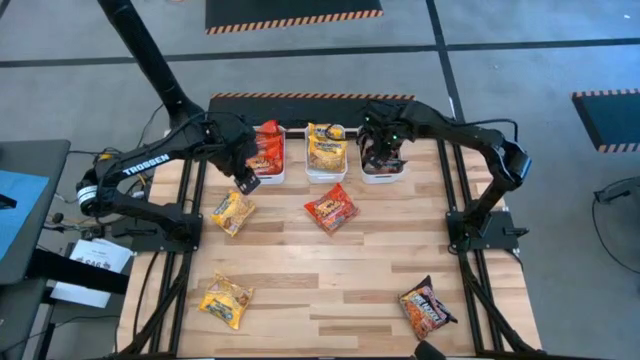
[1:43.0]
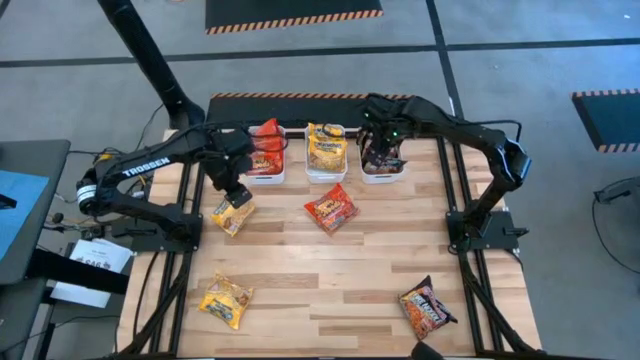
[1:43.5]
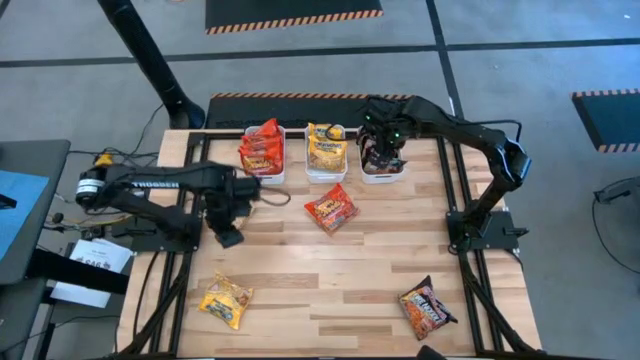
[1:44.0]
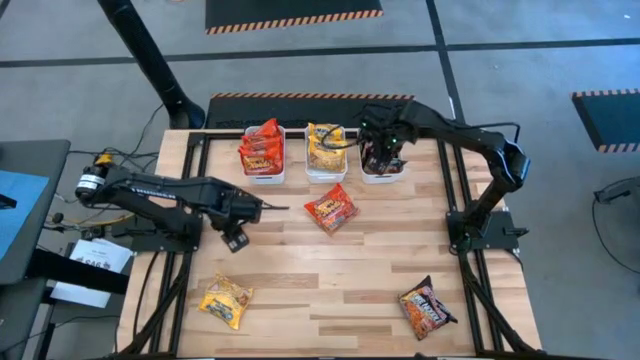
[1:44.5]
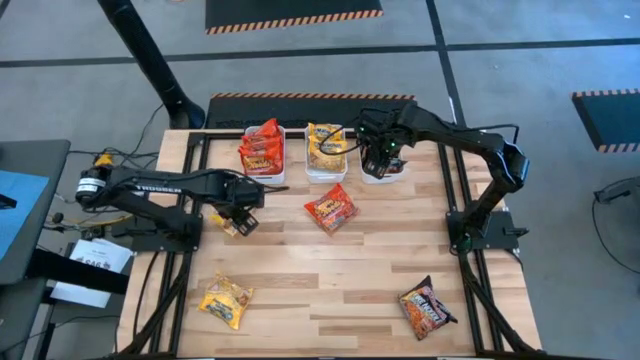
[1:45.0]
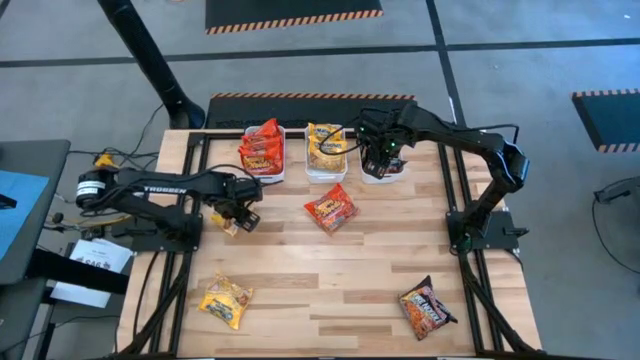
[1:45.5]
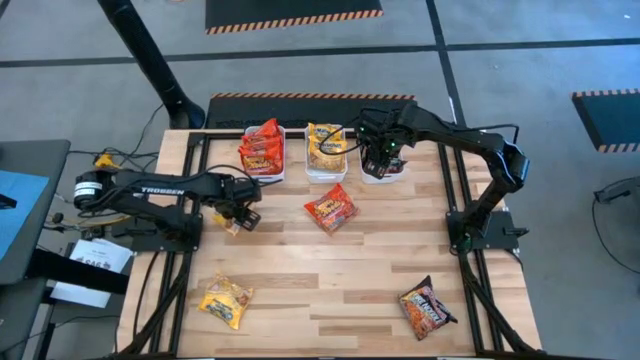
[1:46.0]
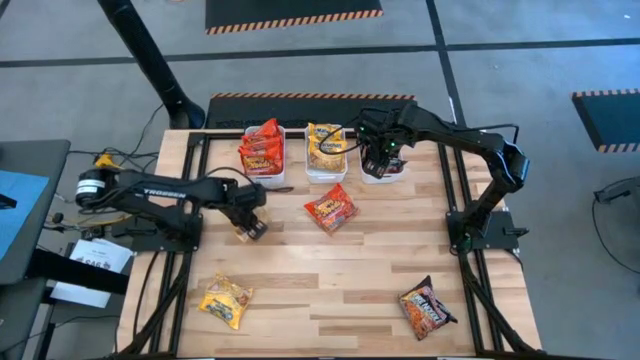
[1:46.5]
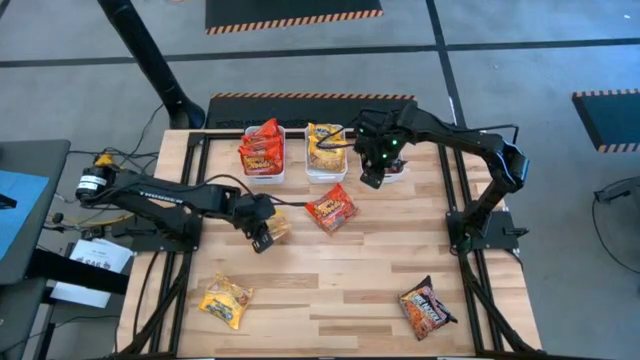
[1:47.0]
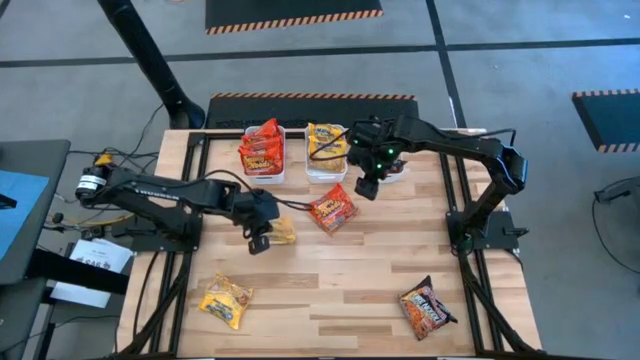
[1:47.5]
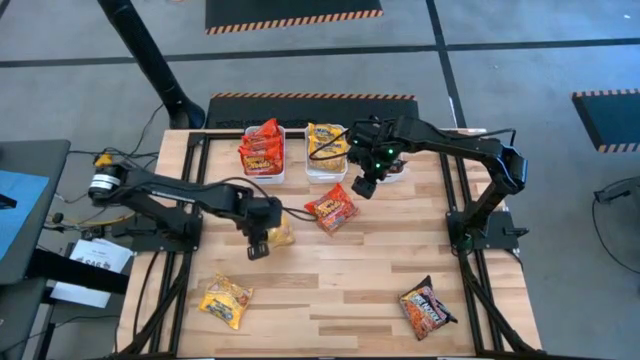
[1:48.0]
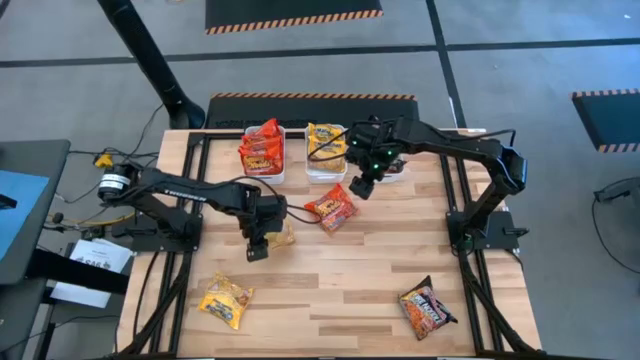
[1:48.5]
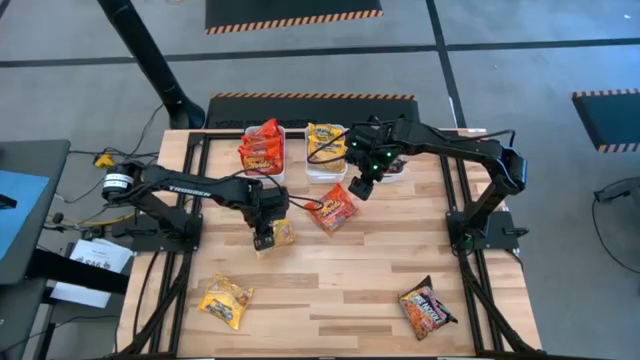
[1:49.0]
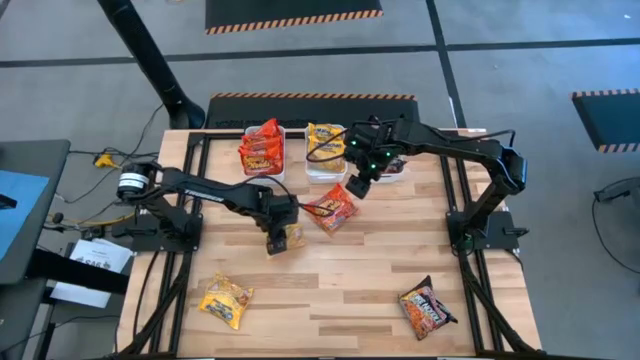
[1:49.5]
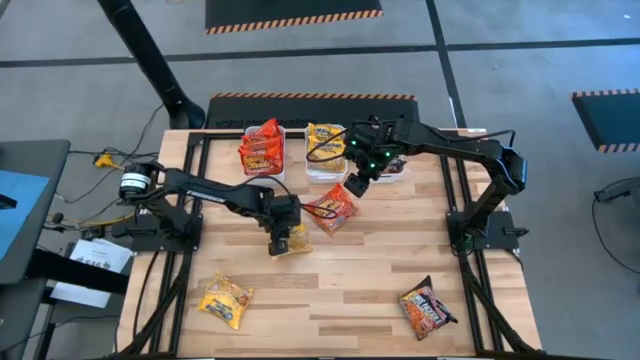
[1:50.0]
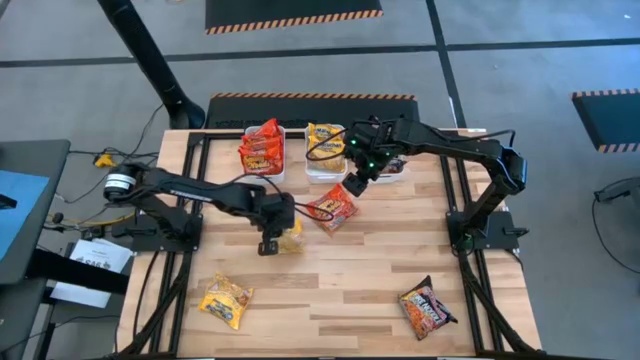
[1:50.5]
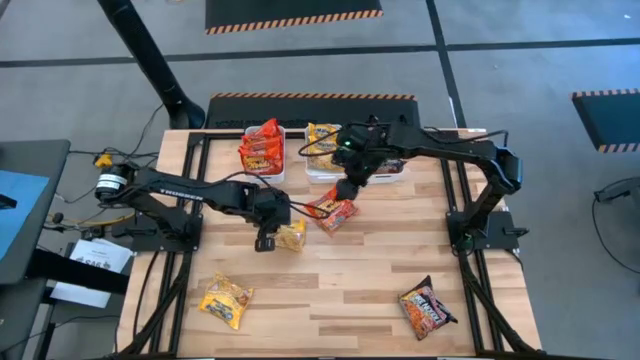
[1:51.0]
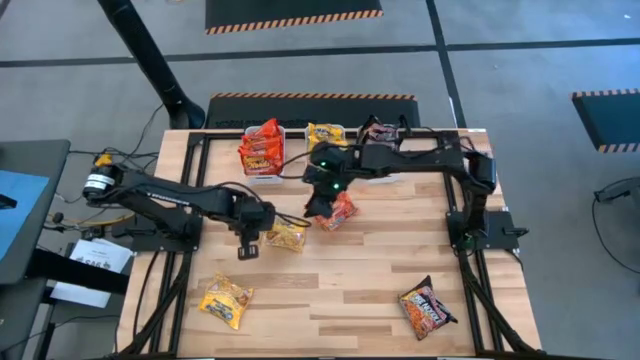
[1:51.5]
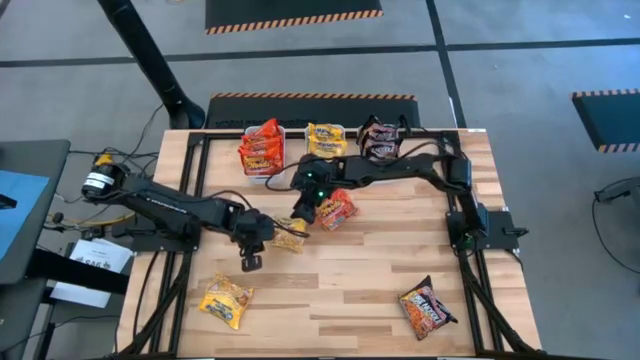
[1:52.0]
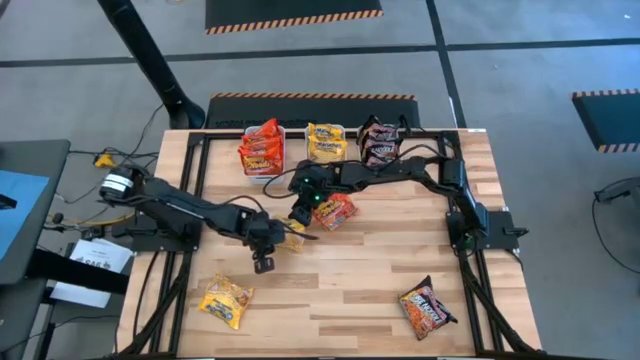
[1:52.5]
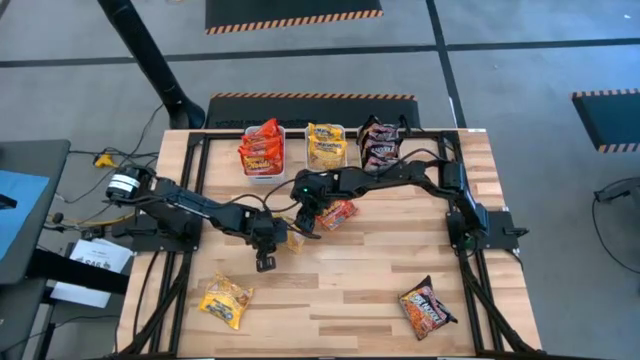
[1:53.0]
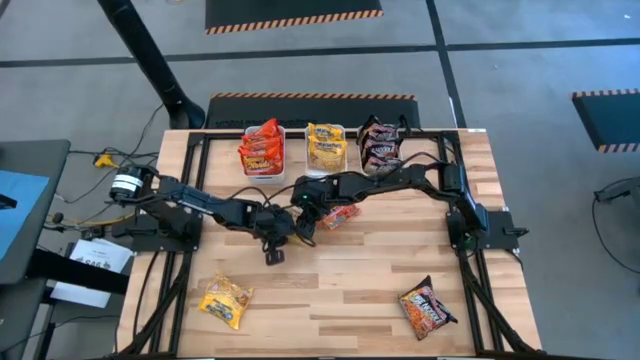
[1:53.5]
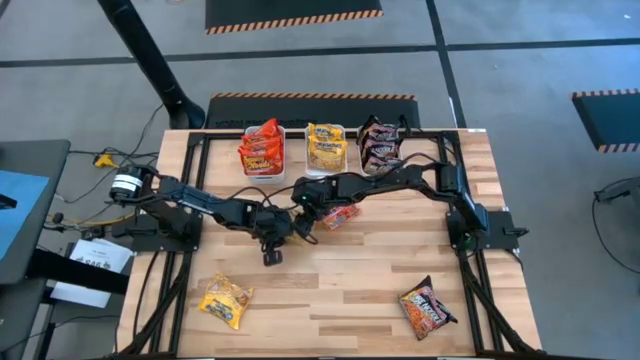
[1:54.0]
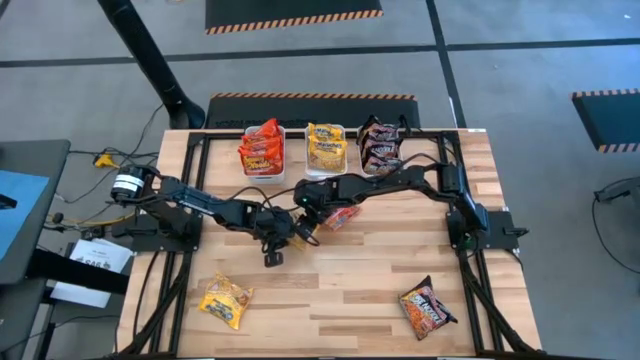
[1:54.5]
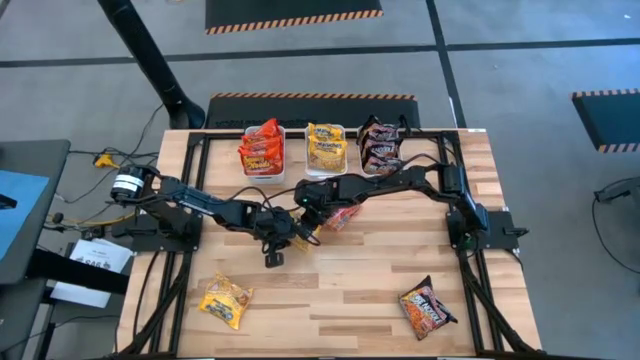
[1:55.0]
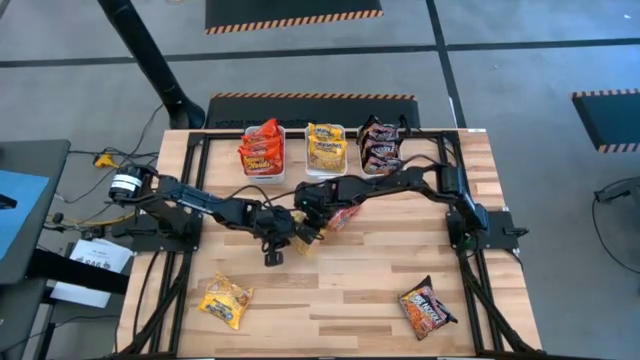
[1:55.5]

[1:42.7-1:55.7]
Task: Sort Maruchan noodles
Put the yellow noodle pack into the middle white bin

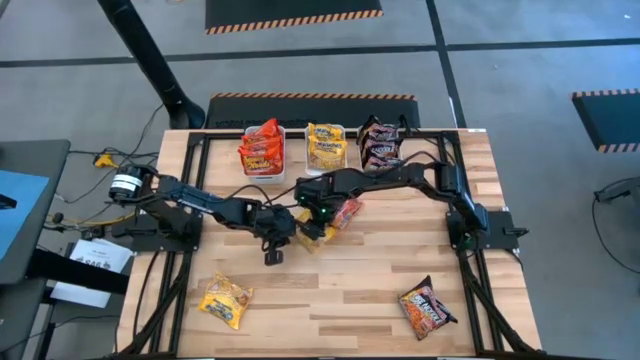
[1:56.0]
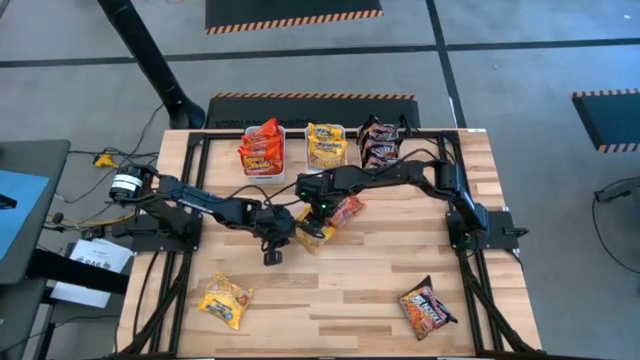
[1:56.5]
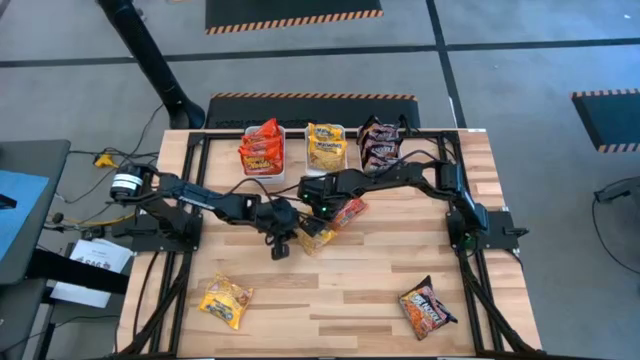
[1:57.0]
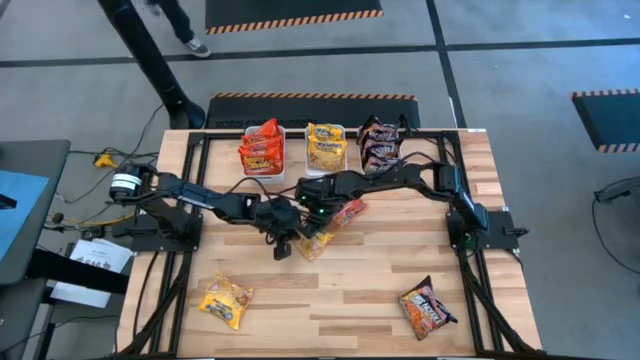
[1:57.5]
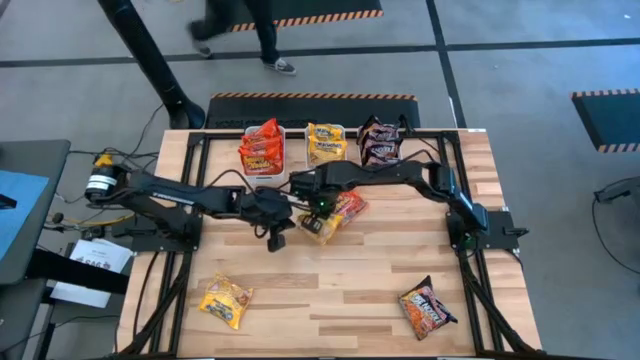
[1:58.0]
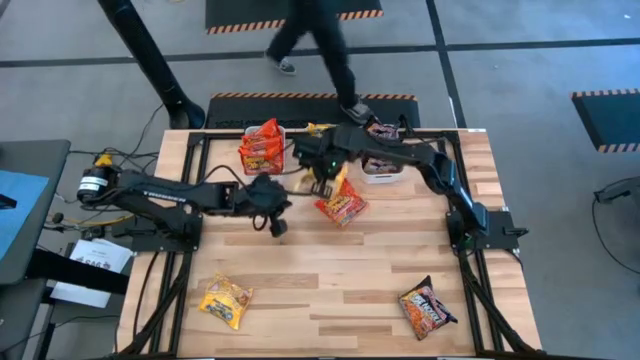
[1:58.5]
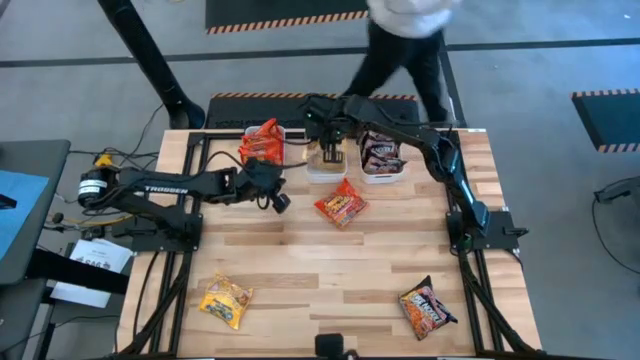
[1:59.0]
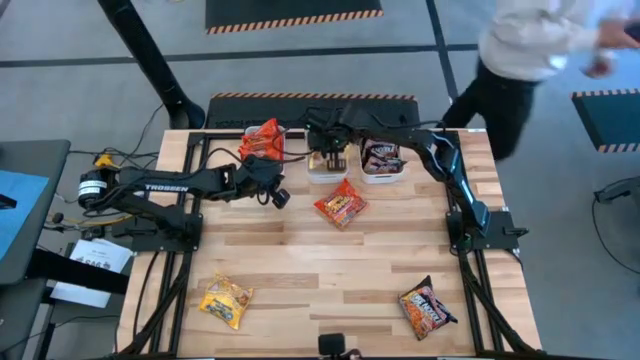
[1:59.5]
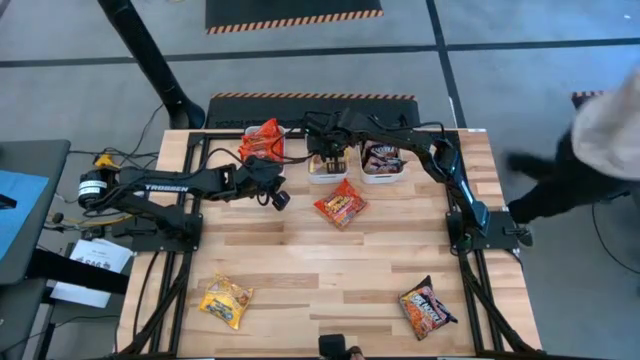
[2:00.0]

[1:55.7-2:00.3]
Put the yellow noodle pack into the middle white bin

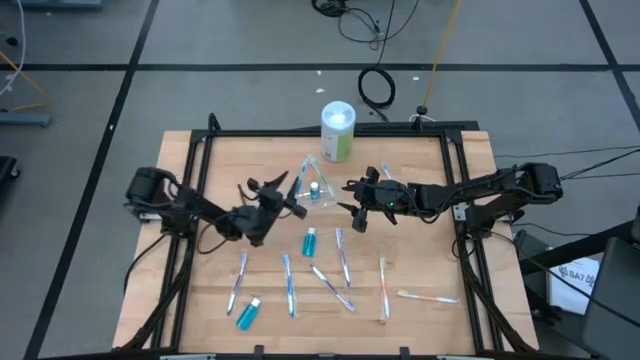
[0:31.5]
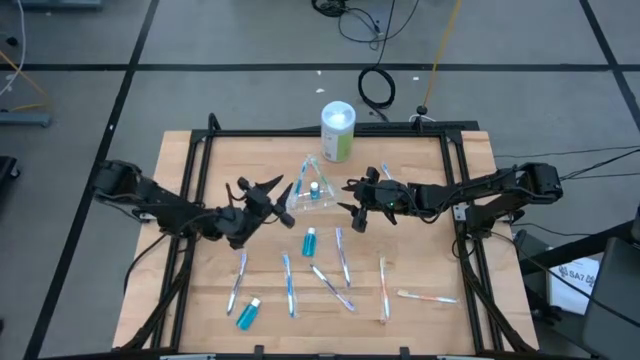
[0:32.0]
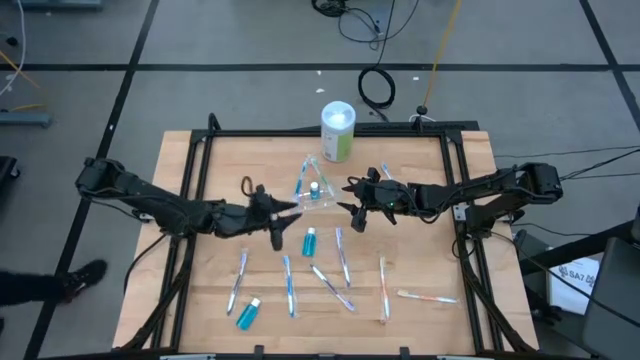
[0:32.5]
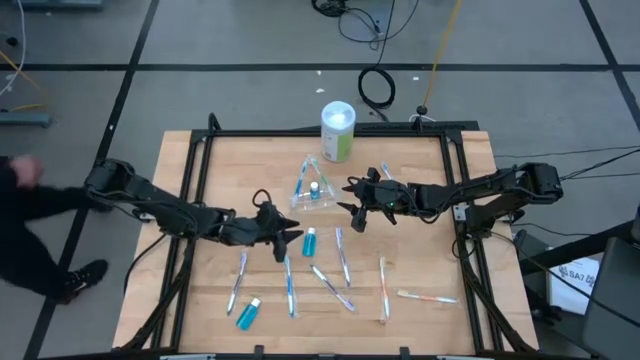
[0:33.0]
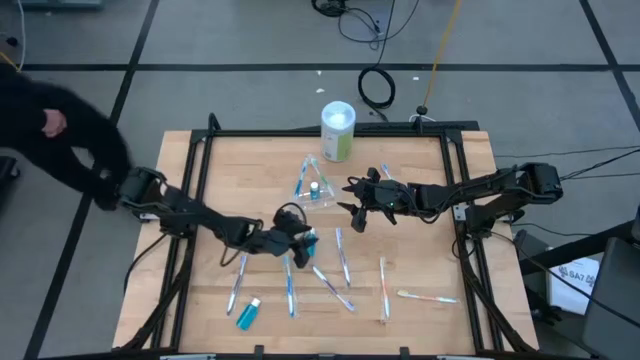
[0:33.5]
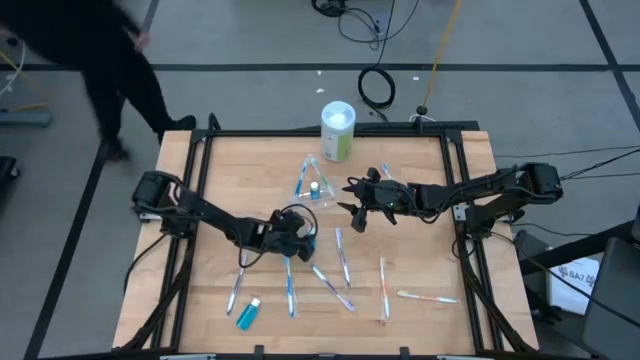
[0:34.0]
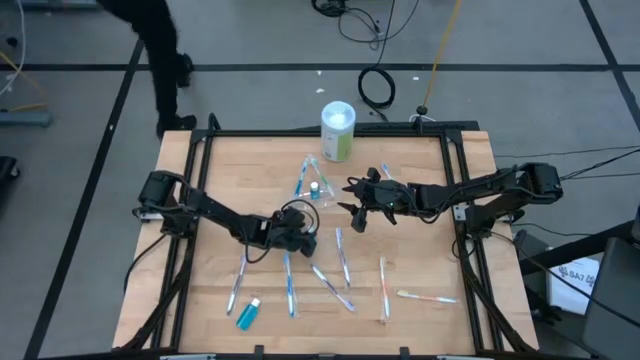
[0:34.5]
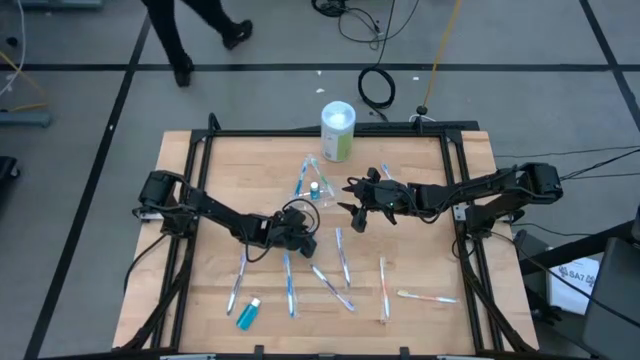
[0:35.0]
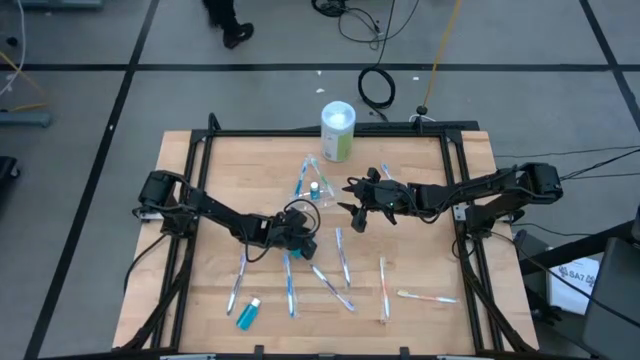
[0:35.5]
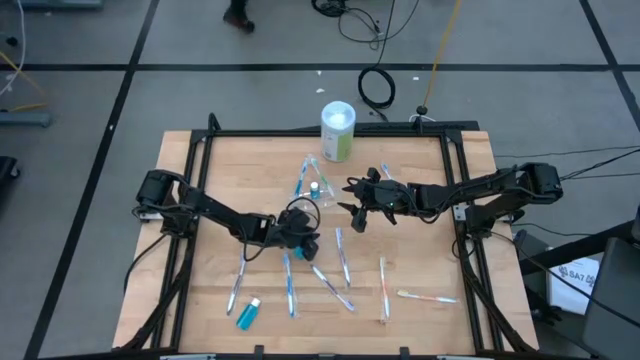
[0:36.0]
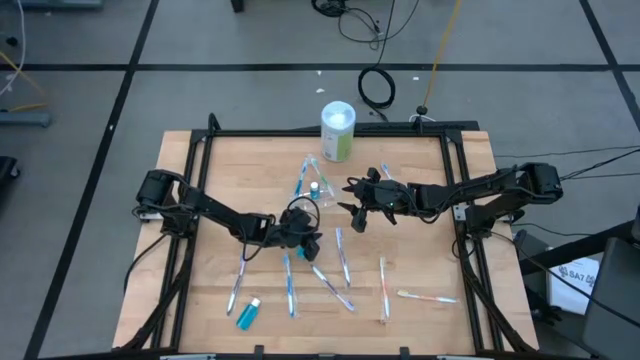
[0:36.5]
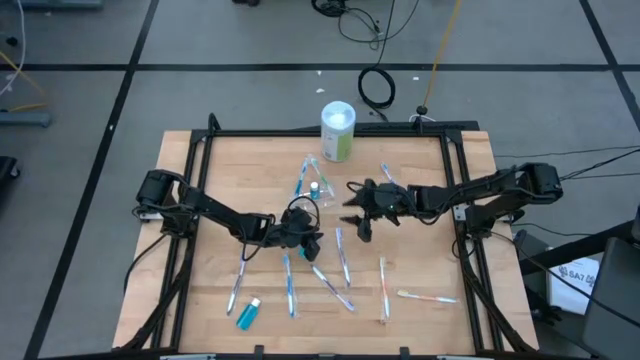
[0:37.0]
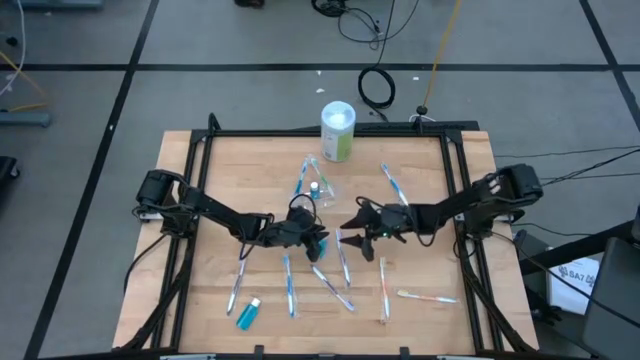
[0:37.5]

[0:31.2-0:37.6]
Task: Pick & Place toothbrushing station
Put the top blue mouthwash into the transparent organizer
